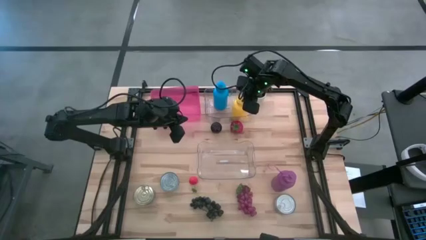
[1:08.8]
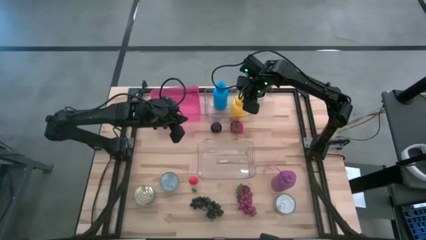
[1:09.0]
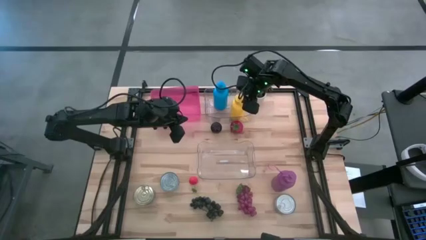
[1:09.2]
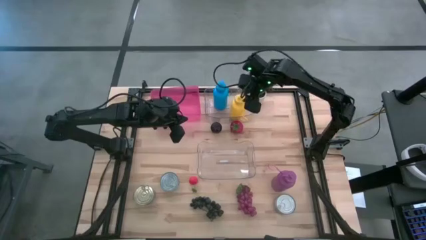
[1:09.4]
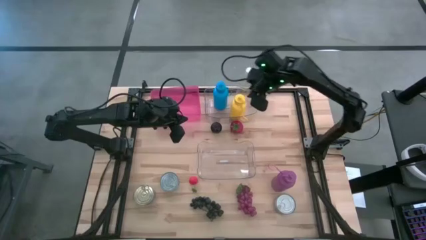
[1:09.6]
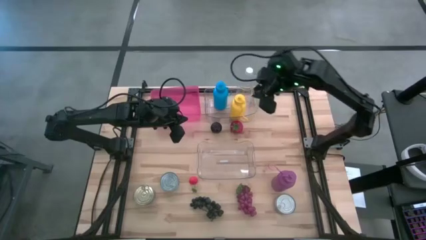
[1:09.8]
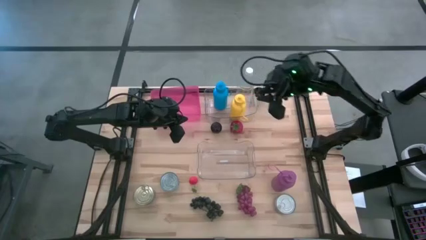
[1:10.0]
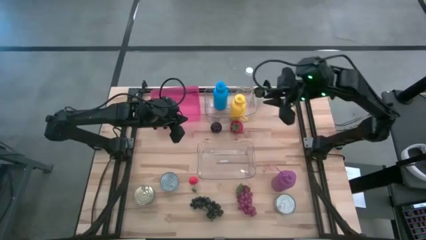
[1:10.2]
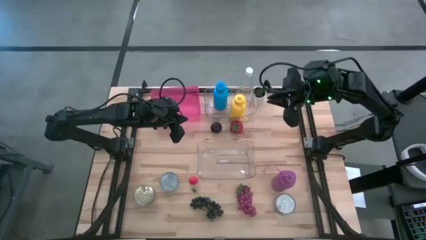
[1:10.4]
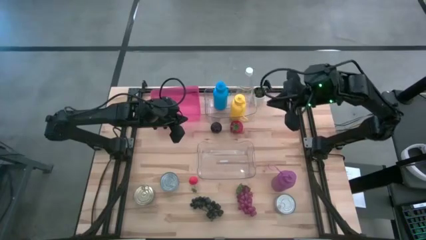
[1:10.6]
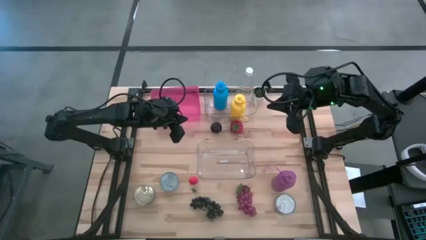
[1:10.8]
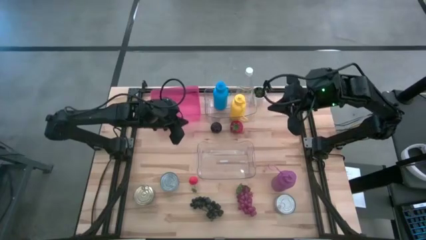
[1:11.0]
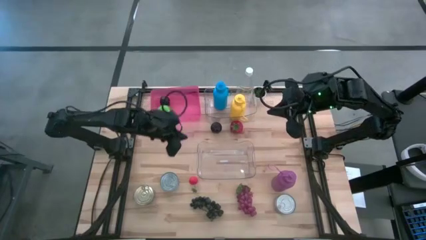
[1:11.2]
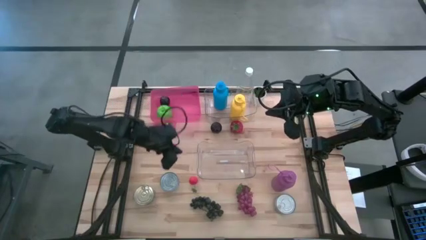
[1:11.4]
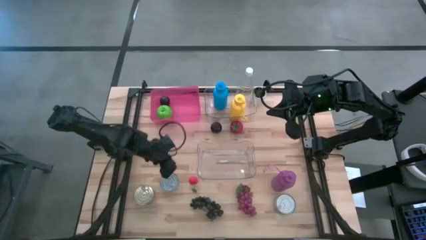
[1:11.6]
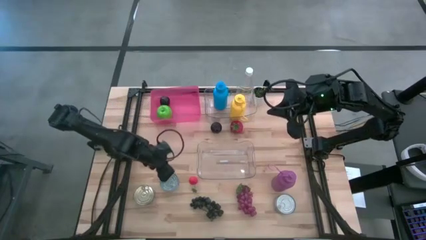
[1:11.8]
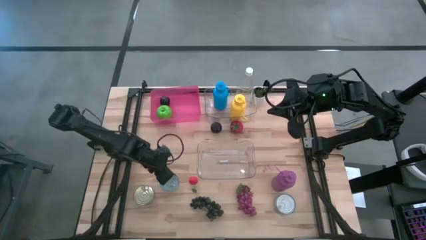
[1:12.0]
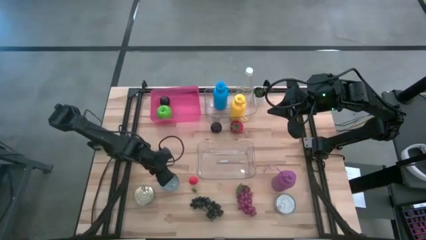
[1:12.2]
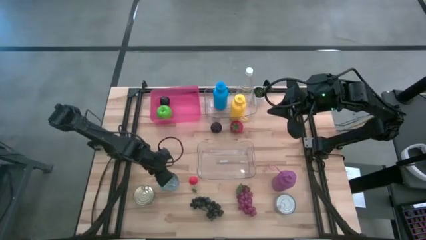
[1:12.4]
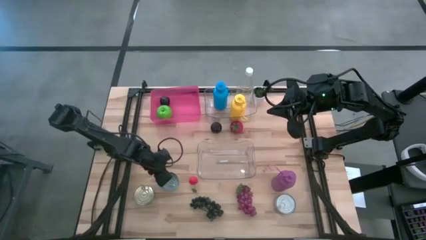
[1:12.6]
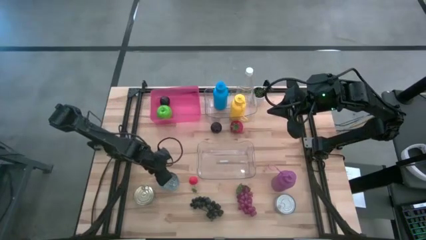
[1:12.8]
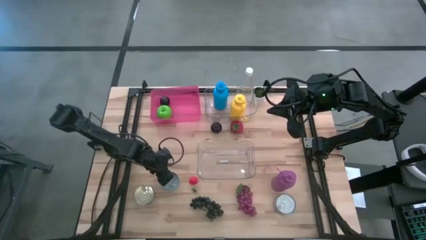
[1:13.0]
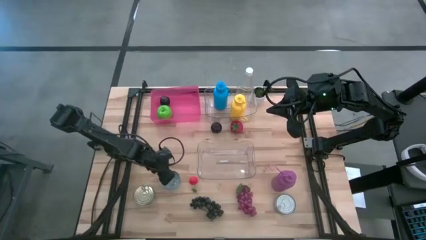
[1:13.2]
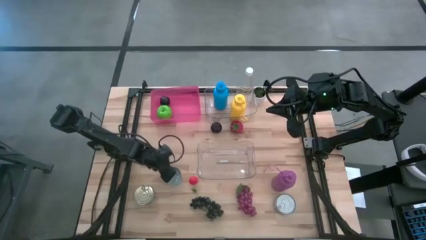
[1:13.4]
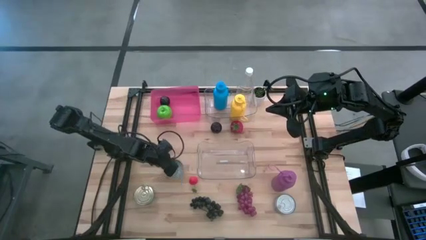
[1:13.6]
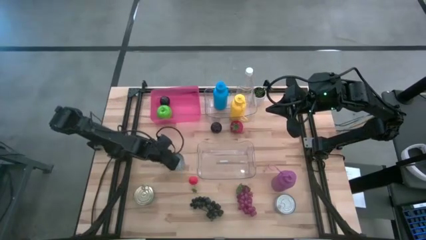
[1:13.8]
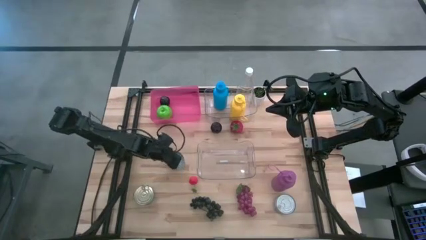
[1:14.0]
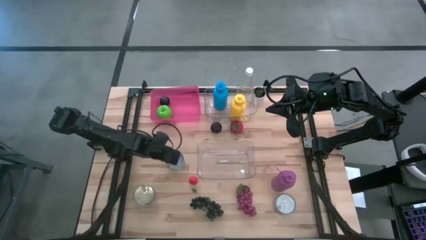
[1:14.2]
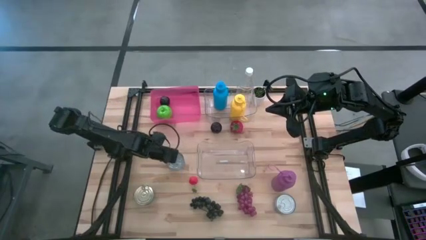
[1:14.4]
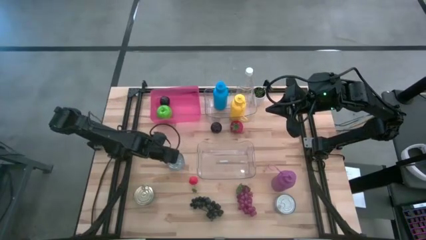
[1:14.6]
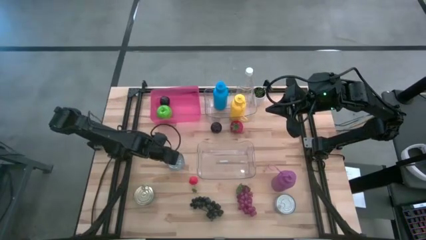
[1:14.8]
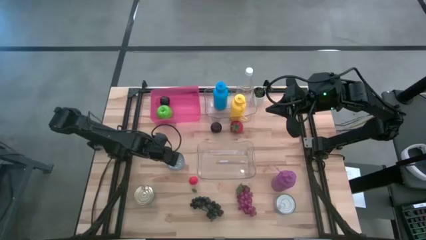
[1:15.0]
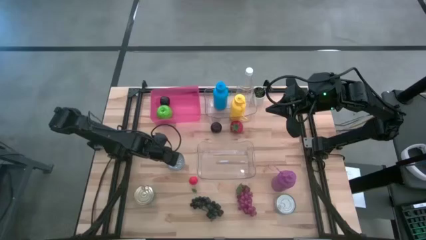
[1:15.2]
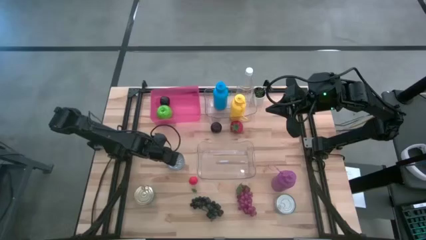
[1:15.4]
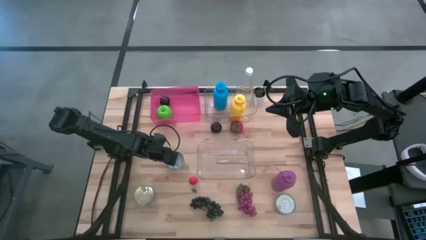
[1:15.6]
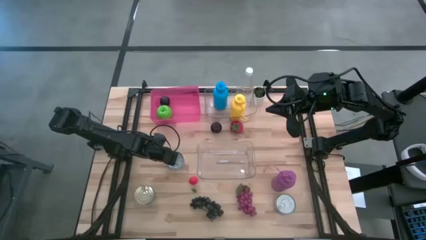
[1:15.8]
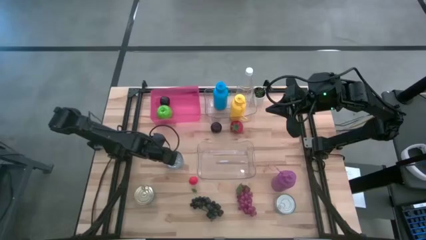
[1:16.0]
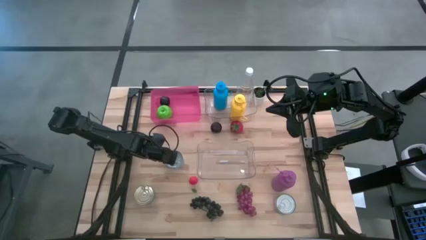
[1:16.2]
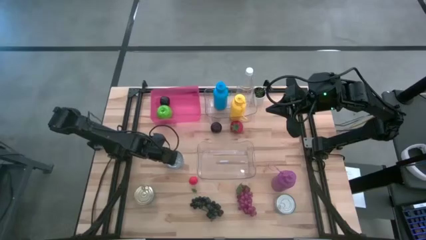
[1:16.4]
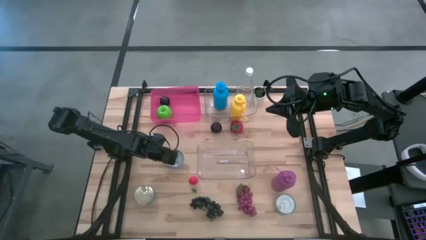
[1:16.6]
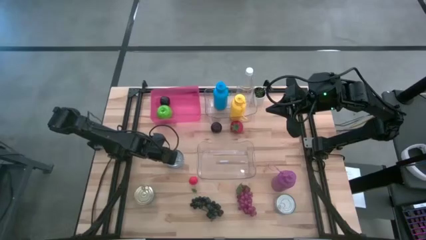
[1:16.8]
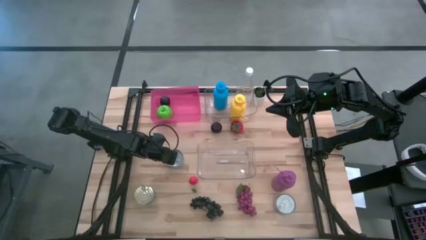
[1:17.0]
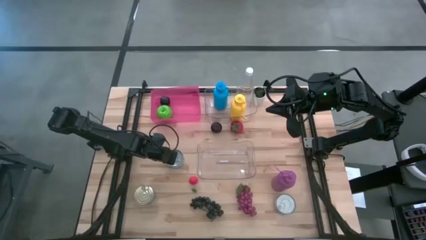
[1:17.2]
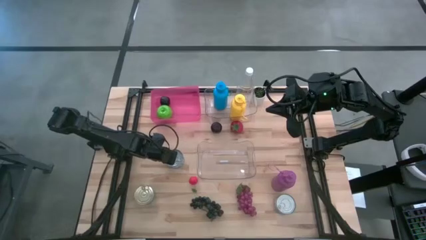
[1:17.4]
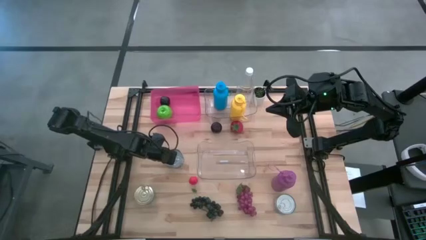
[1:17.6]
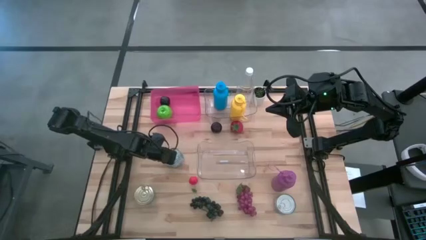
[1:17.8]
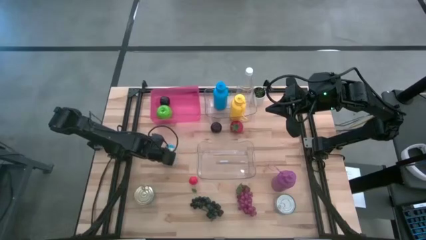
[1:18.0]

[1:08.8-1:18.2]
Task: Pick & Place Food Item
Put the yellow blue tuna can into the bottom transparent bin
